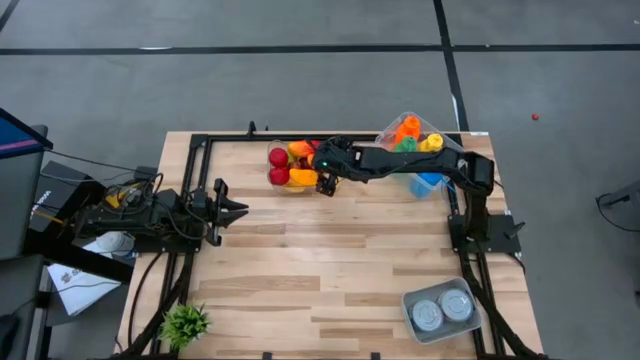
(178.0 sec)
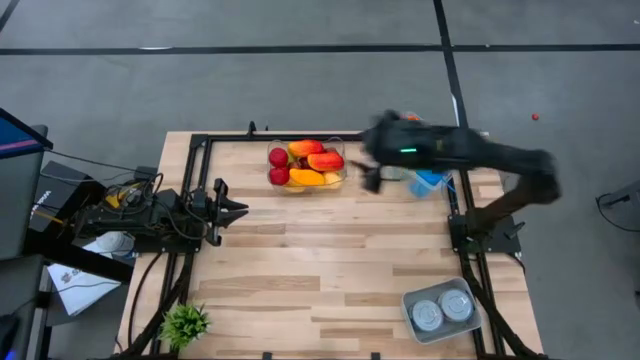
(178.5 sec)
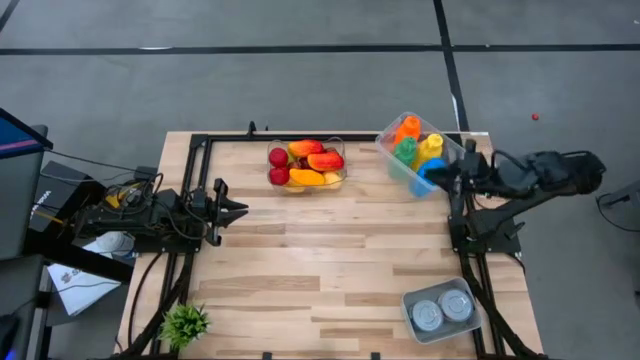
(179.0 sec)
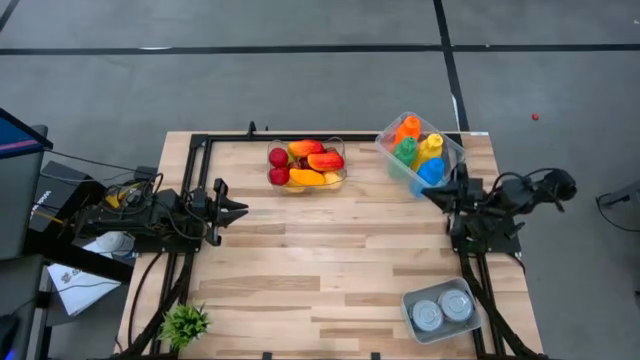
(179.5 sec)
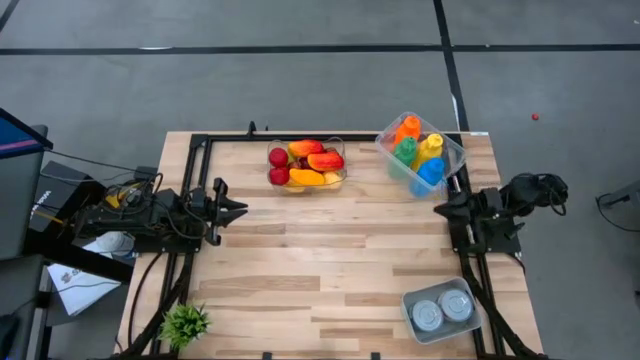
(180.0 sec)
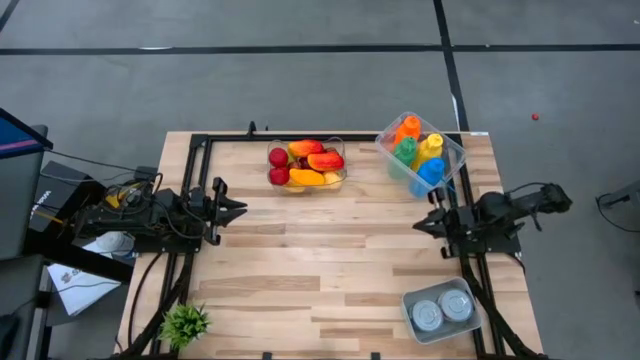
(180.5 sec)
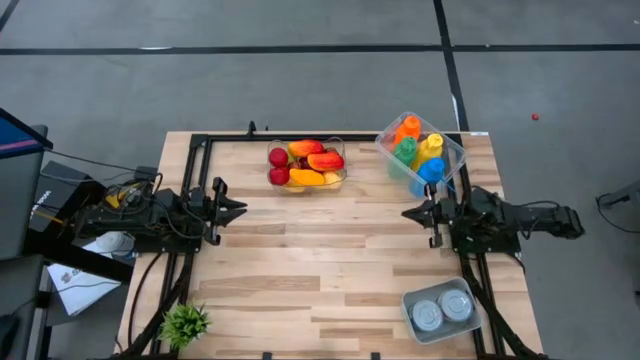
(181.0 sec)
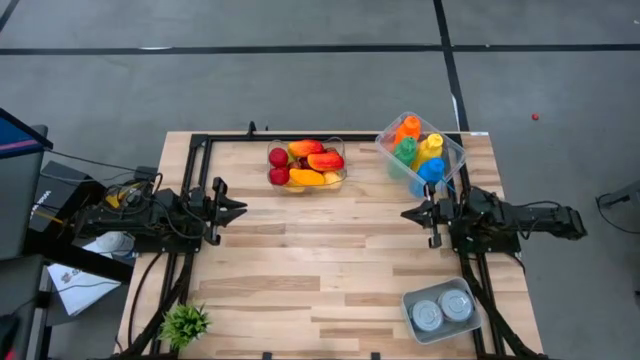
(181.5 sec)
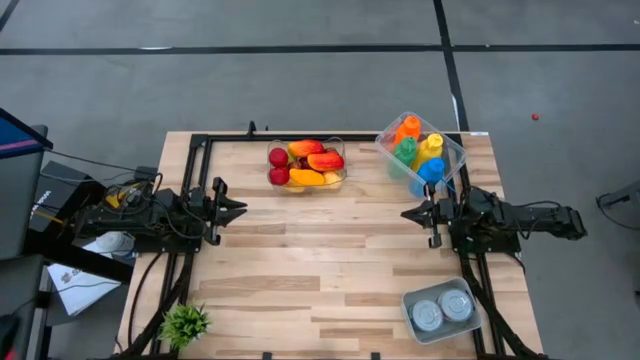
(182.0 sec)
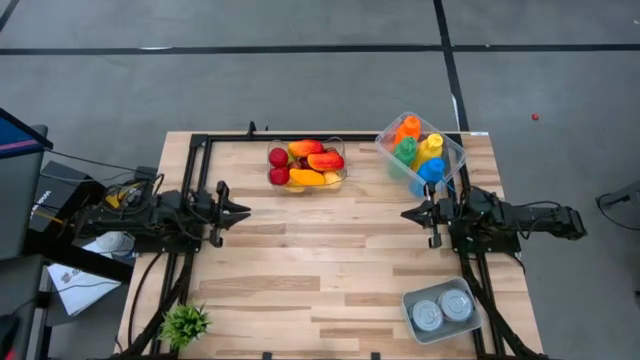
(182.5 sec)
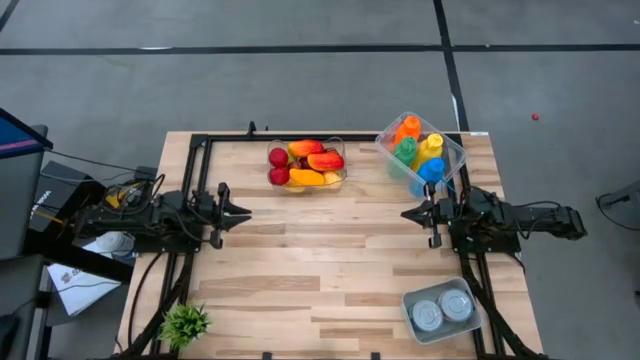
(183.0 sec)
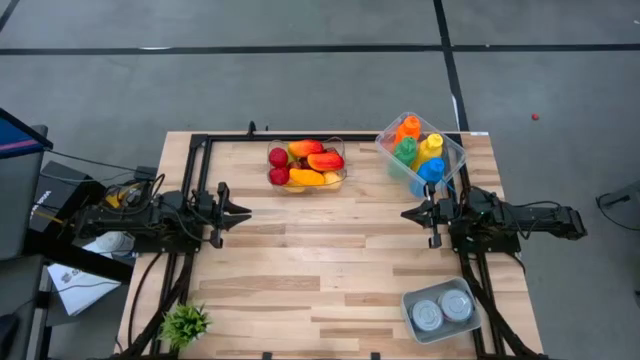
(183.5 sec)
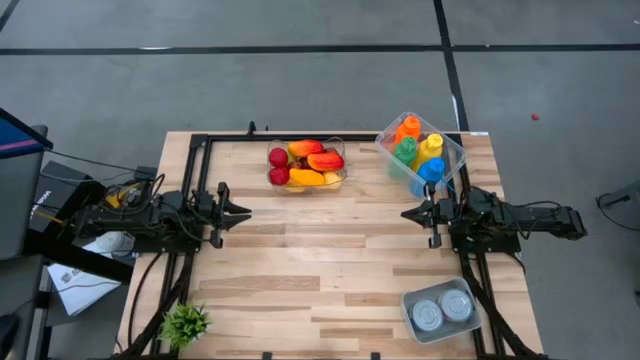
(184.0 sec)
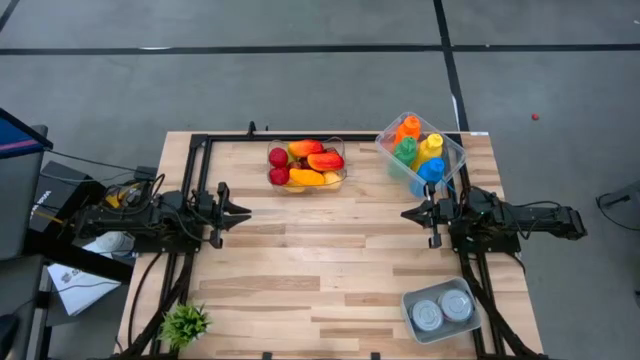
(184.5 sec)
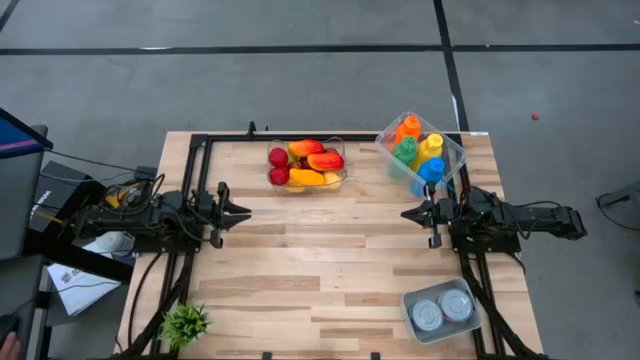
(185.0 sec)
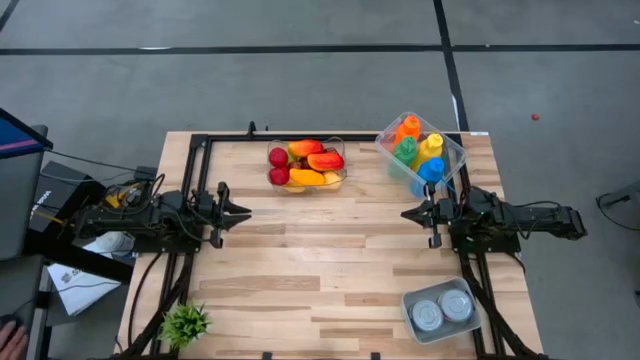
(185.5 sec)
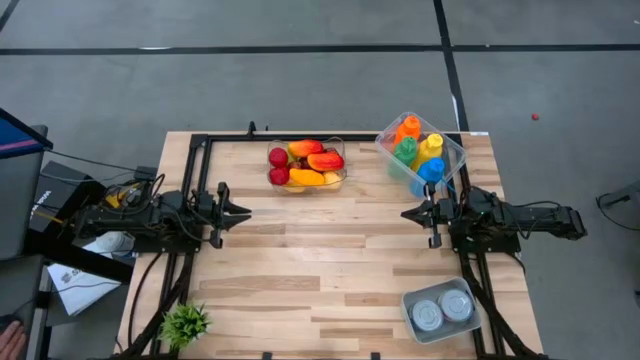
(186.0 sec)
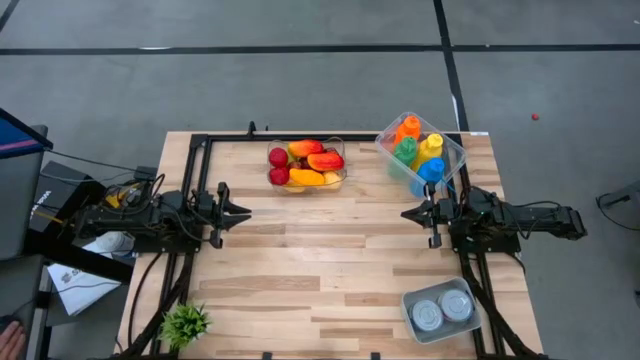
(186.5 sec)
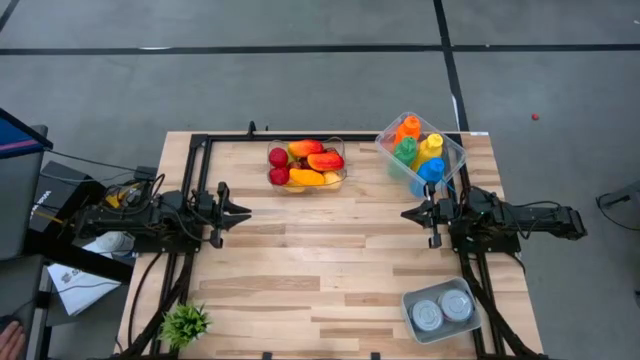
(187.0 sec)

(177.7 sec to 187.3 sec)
Task: Pick & Place Food Item
Return to Home Position

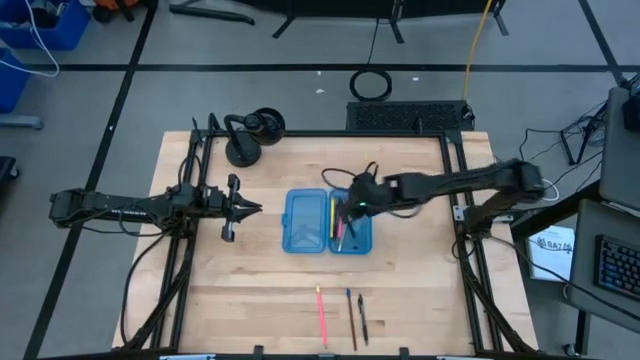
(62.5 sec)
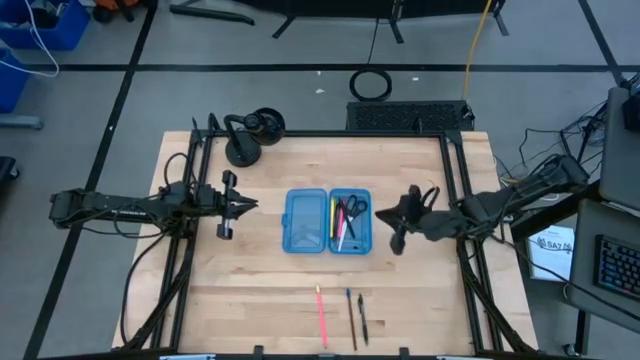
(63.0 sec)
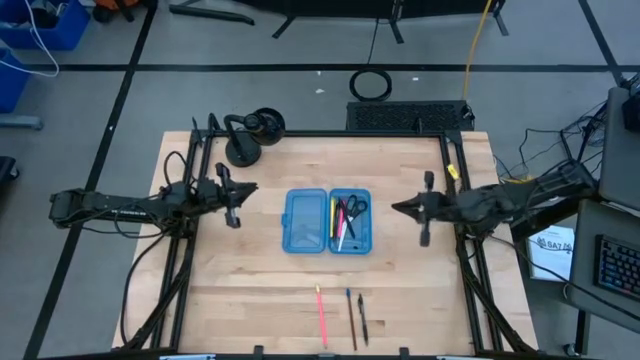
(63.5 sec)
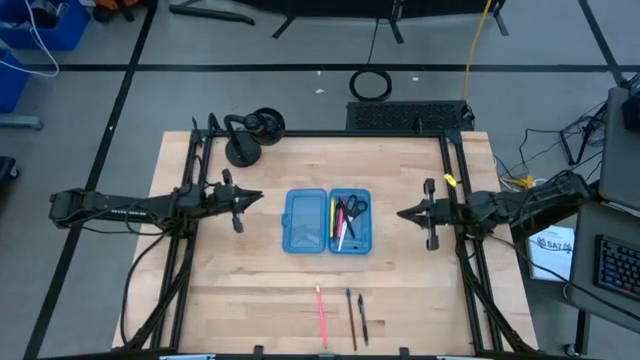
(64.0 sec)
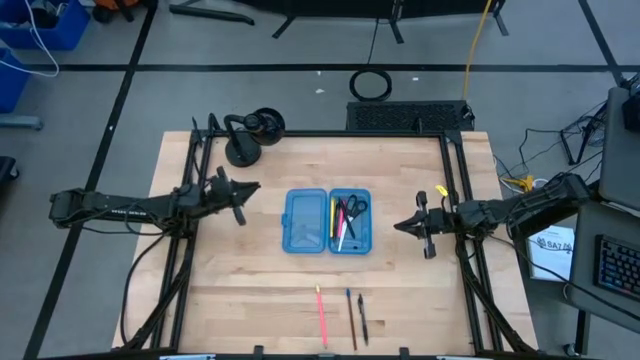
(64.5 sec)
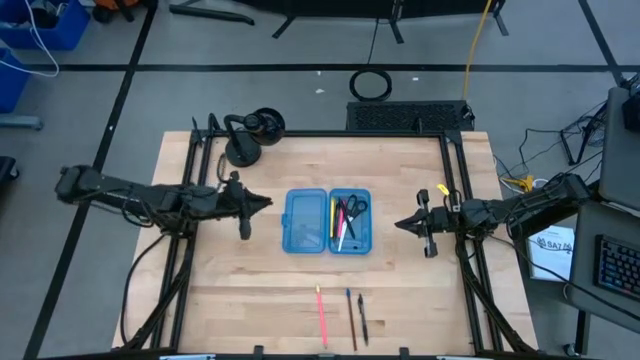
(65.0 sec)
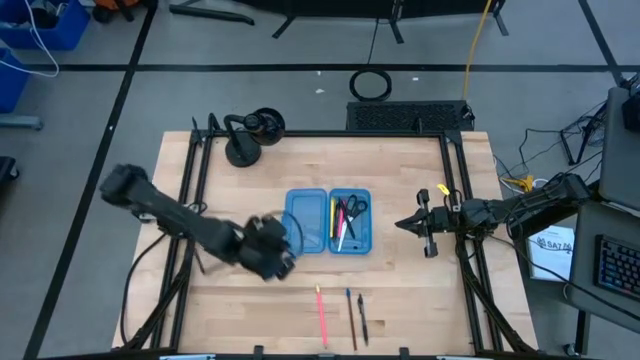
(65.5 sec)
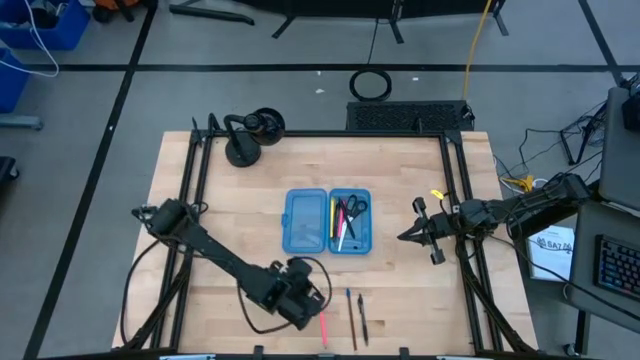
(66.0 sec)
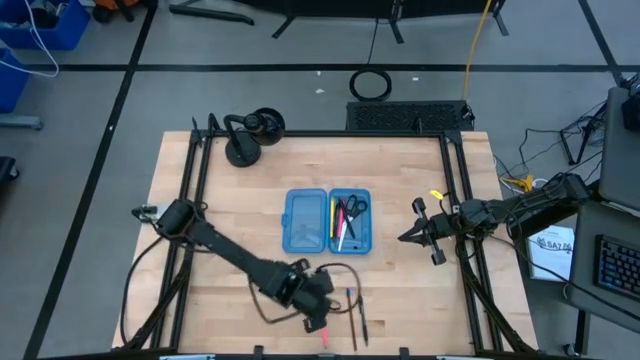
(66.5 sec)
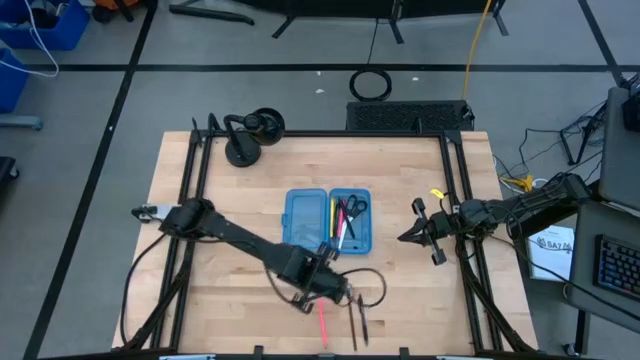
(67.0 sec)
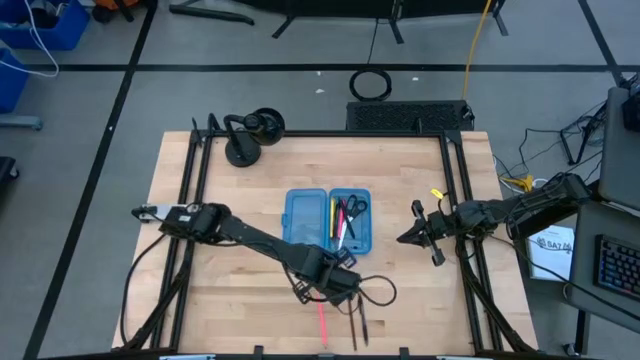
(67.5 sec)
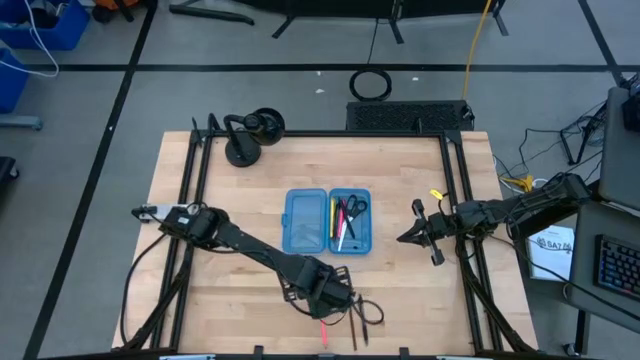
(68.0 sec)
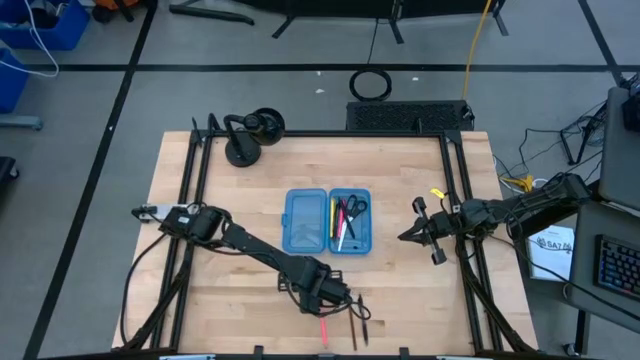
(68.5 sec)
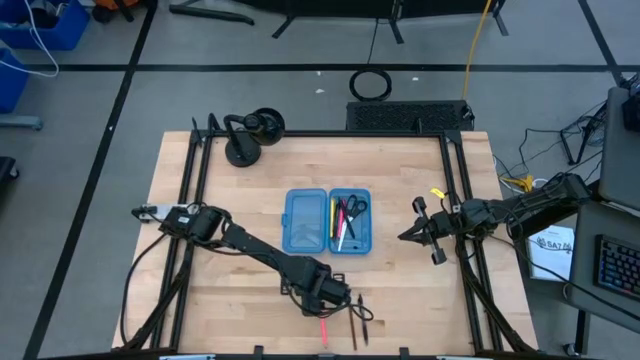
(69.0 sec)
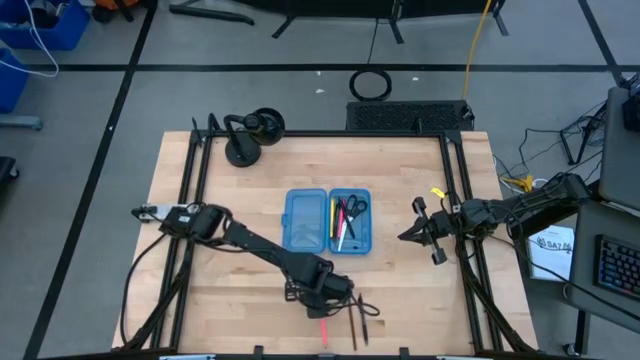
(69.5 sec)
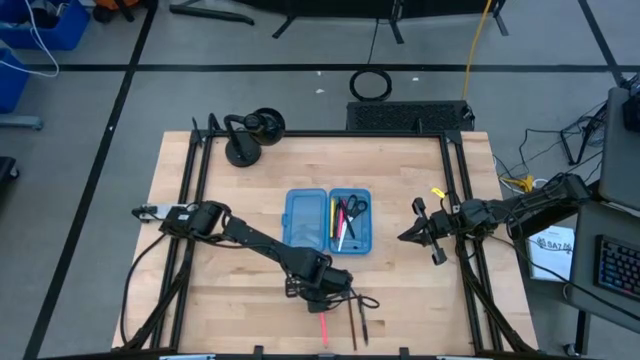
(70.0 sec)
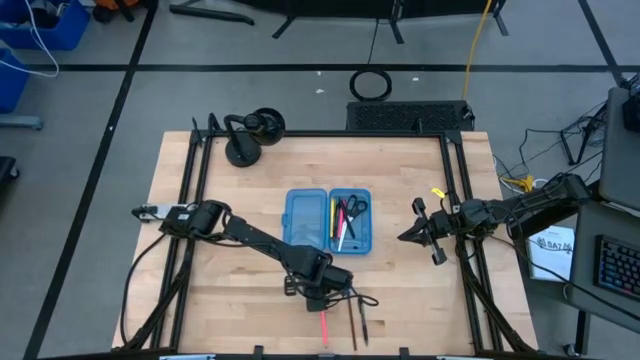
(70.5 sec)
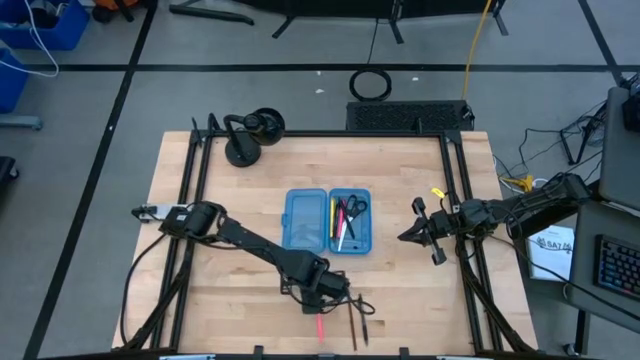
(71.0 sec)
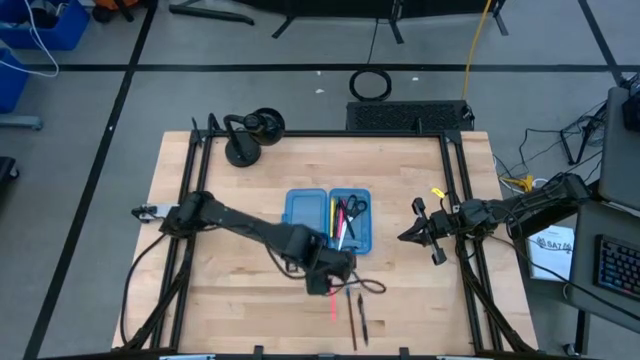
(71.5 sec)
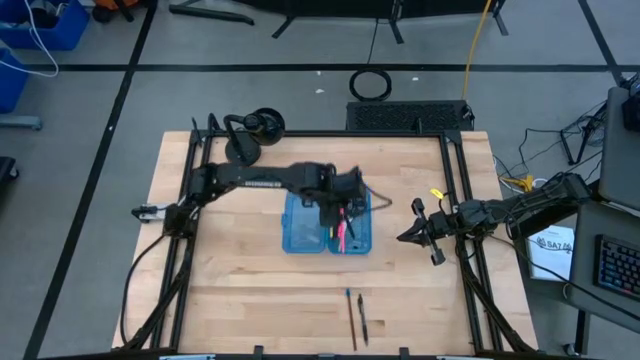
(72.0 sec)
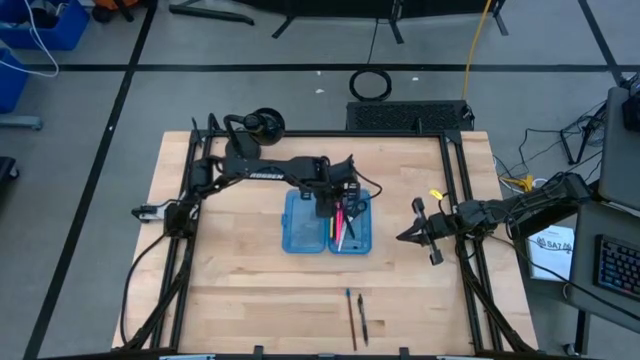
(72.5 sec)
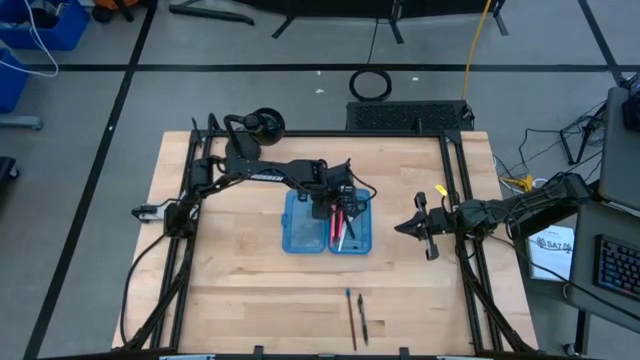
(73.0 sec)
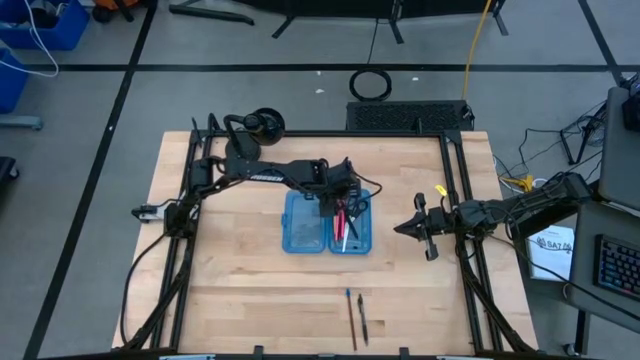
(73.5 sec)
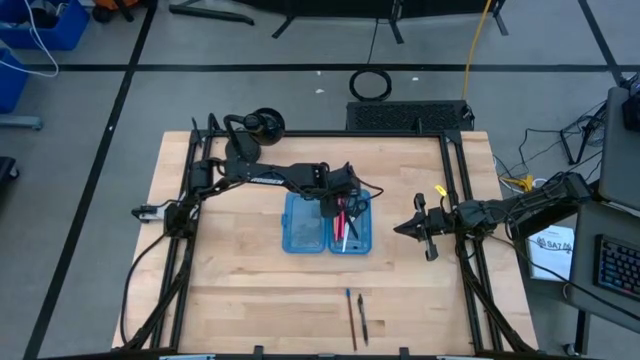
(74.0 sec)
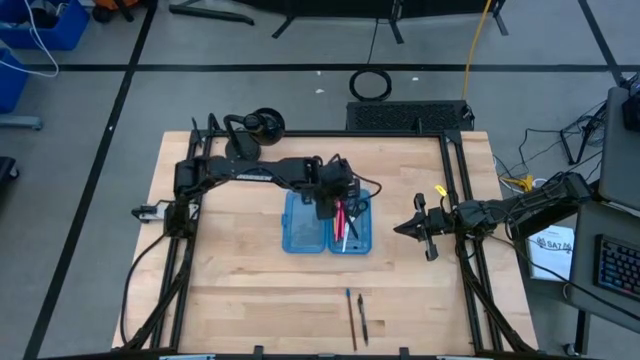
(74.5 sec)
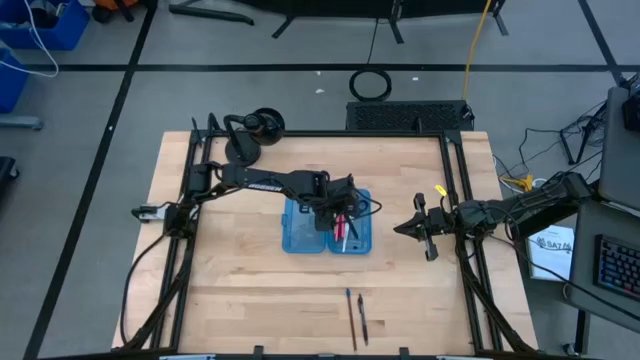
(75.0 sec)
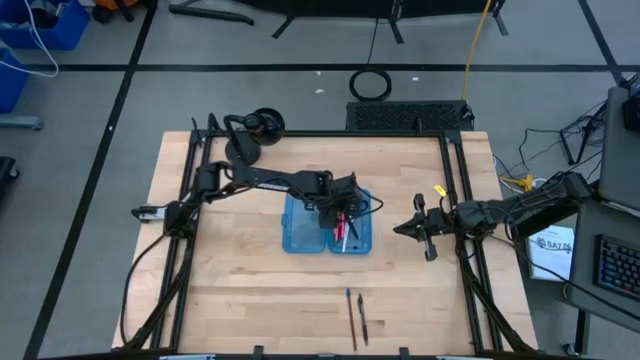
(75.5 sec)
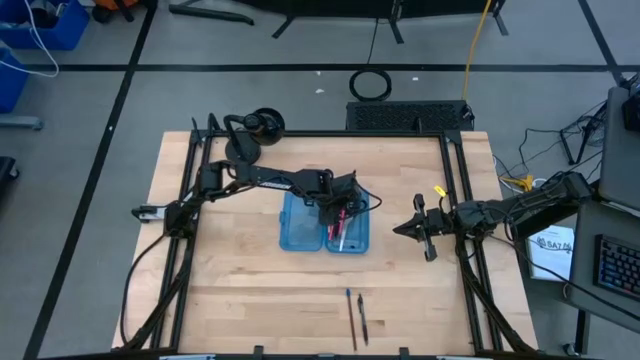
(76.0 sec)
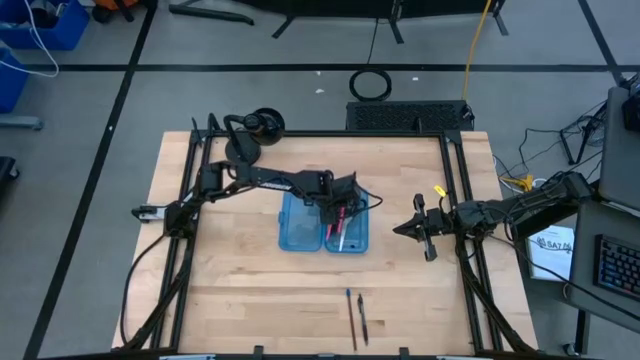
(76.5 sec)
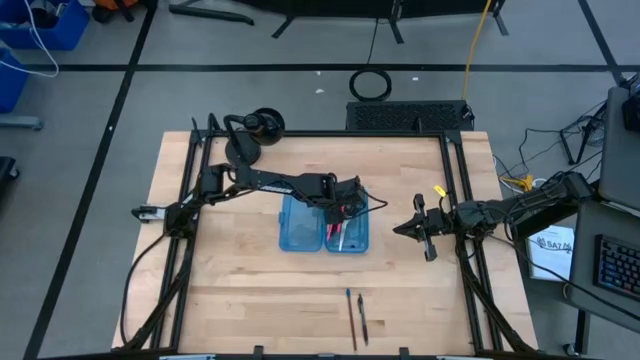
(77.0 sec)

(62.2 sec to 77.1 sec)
Task: Pick & place school supplies into a supply box
Put the pink pencil into the blue supply box
